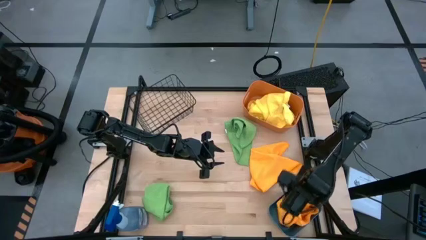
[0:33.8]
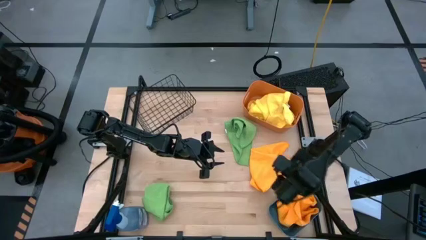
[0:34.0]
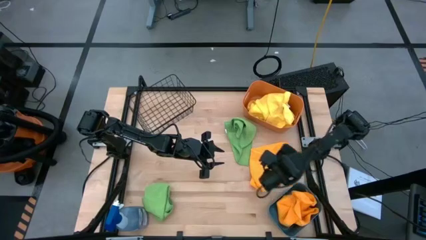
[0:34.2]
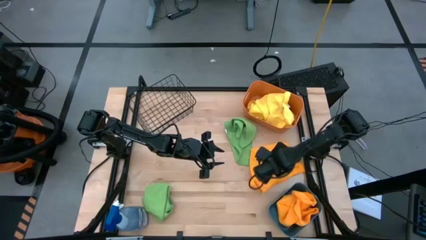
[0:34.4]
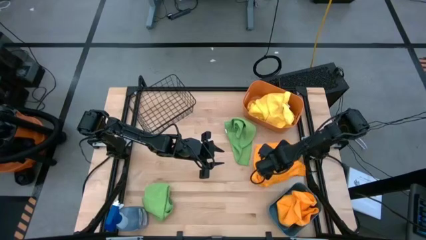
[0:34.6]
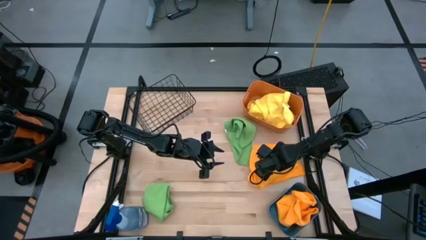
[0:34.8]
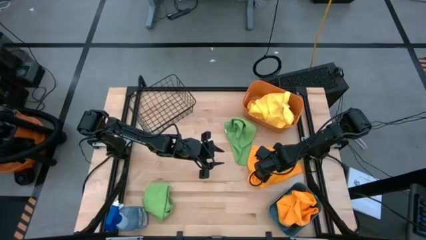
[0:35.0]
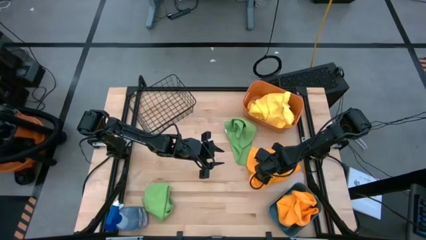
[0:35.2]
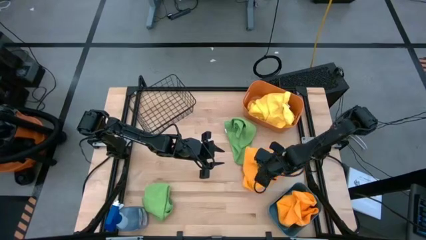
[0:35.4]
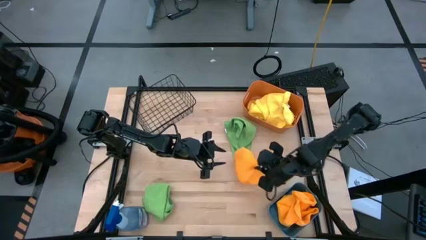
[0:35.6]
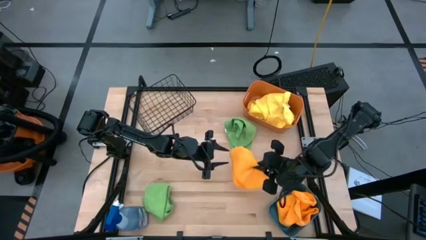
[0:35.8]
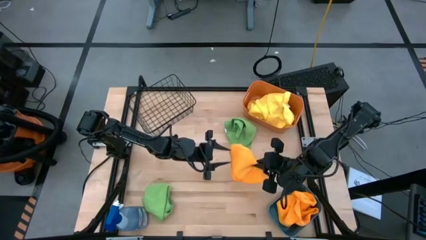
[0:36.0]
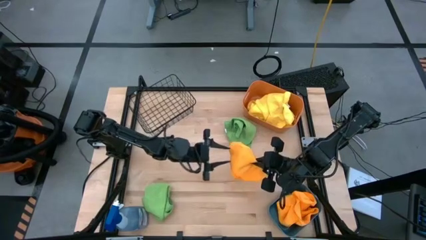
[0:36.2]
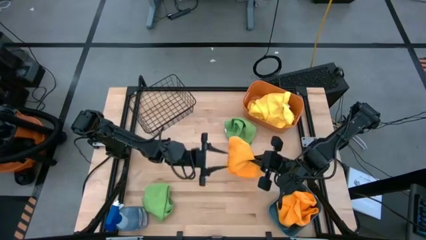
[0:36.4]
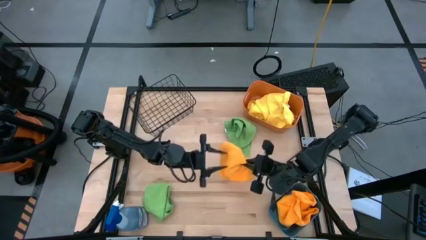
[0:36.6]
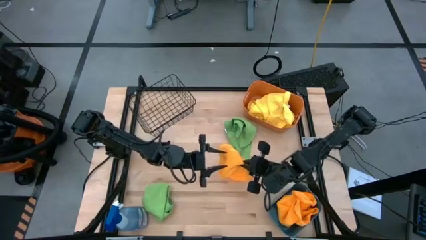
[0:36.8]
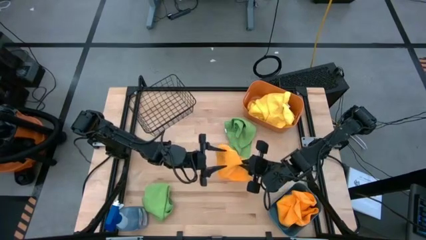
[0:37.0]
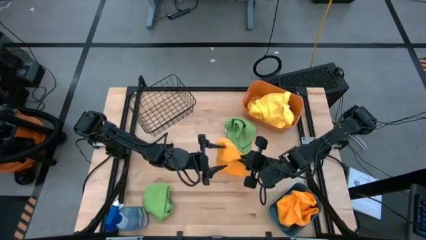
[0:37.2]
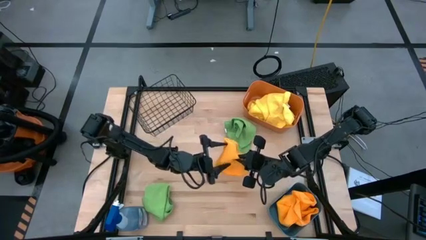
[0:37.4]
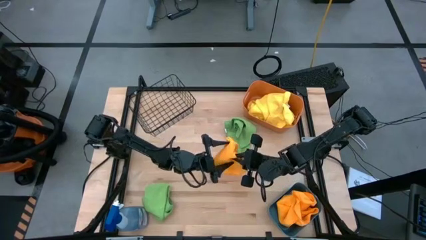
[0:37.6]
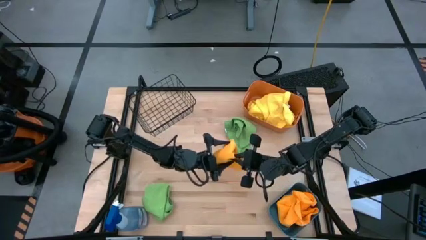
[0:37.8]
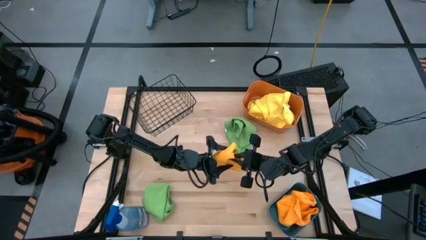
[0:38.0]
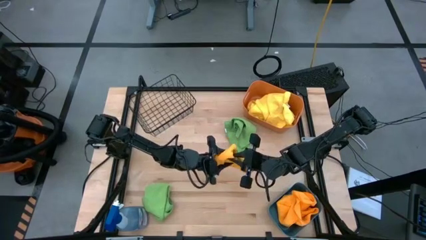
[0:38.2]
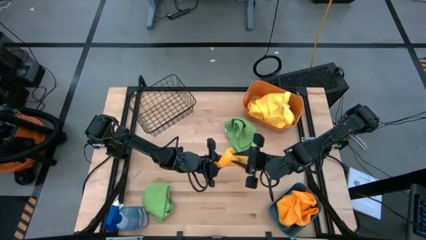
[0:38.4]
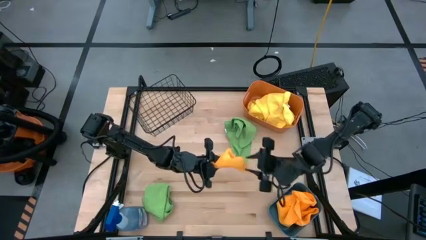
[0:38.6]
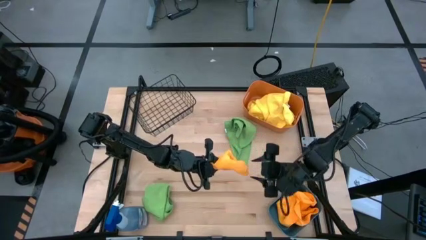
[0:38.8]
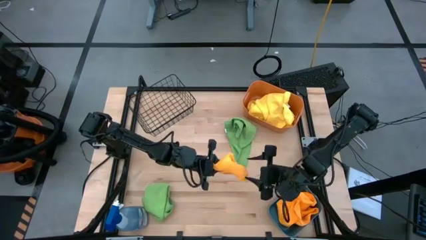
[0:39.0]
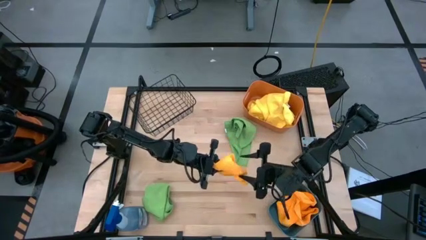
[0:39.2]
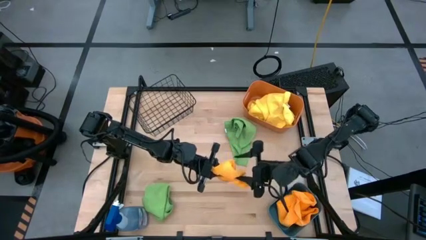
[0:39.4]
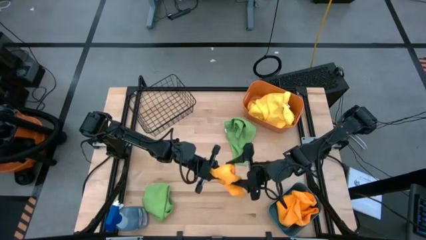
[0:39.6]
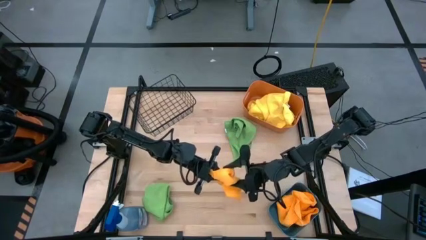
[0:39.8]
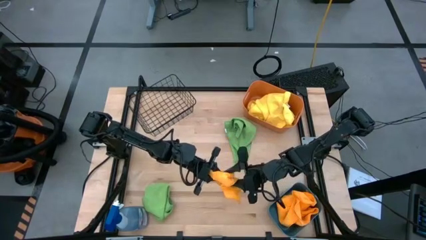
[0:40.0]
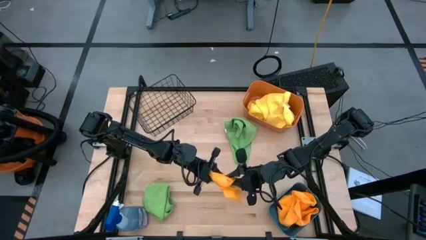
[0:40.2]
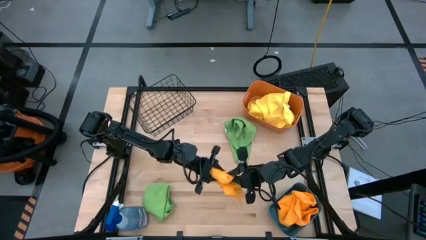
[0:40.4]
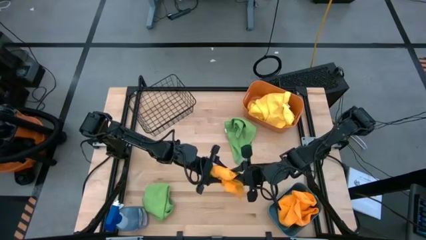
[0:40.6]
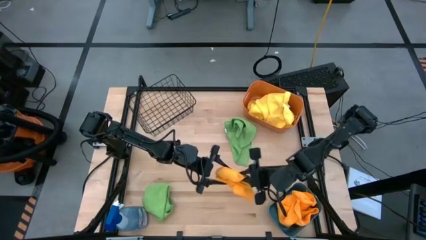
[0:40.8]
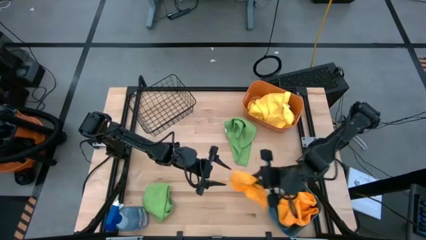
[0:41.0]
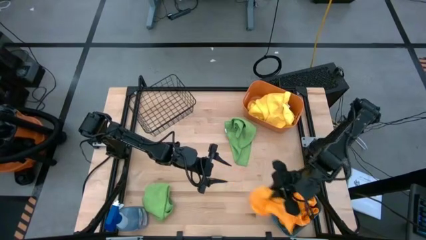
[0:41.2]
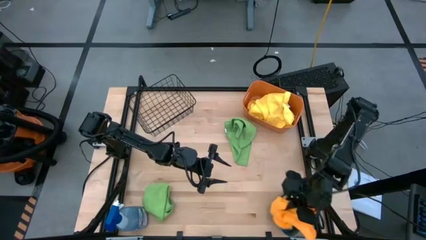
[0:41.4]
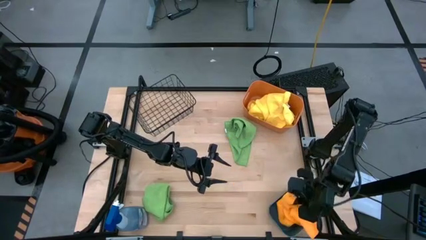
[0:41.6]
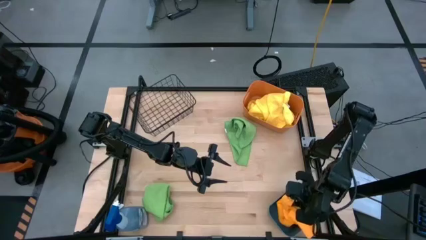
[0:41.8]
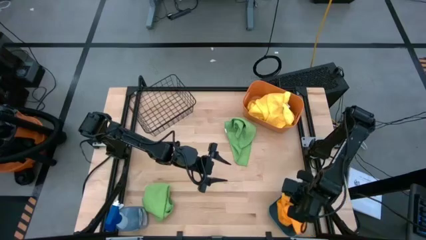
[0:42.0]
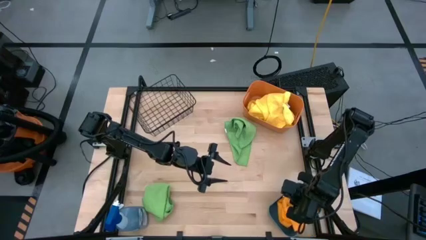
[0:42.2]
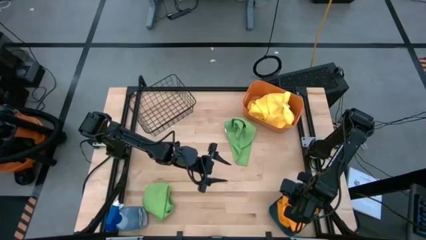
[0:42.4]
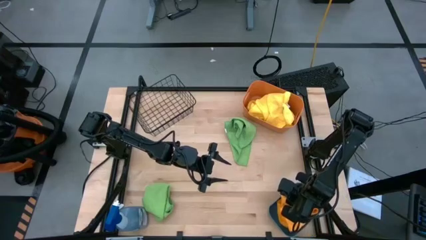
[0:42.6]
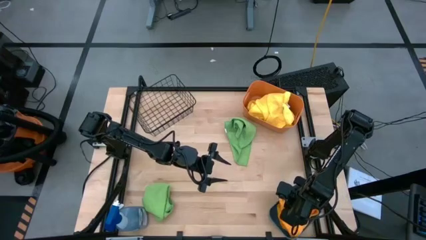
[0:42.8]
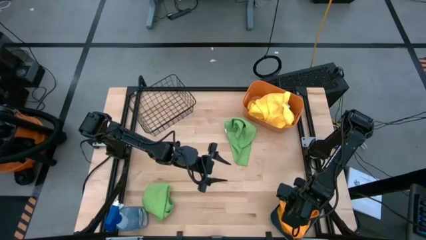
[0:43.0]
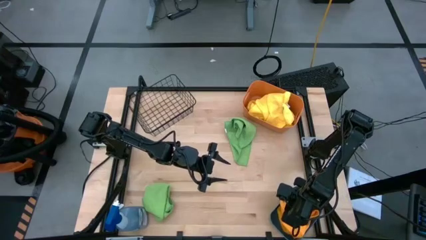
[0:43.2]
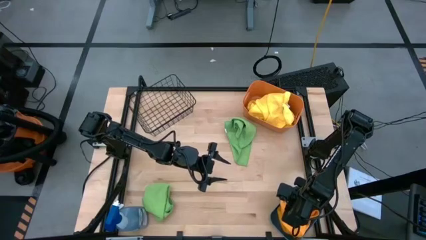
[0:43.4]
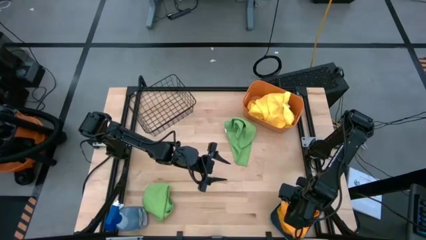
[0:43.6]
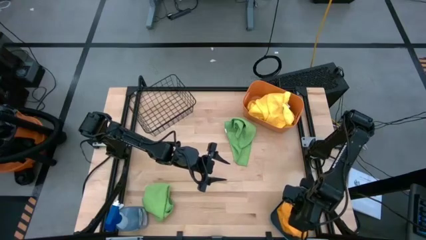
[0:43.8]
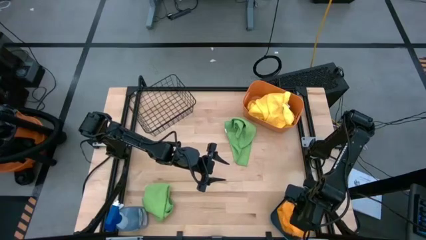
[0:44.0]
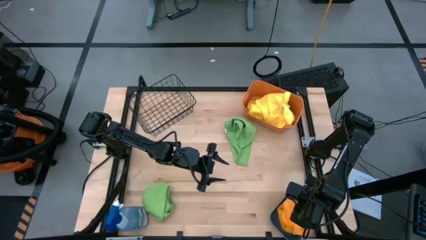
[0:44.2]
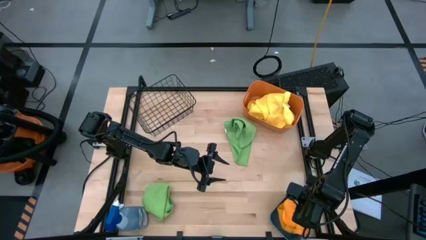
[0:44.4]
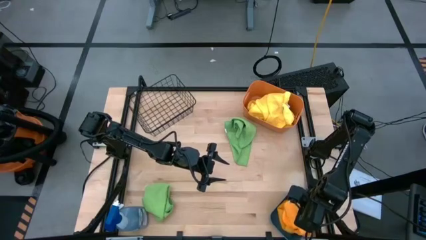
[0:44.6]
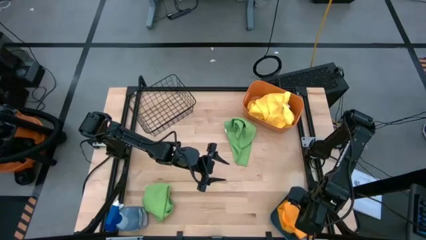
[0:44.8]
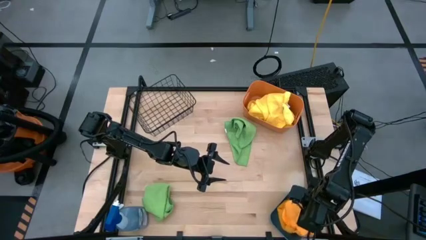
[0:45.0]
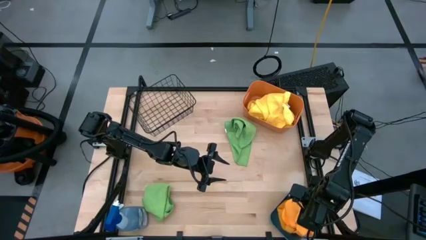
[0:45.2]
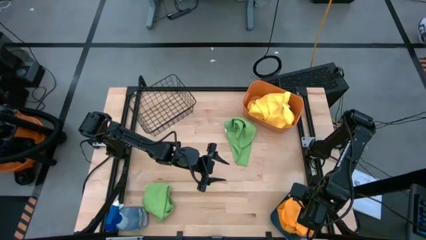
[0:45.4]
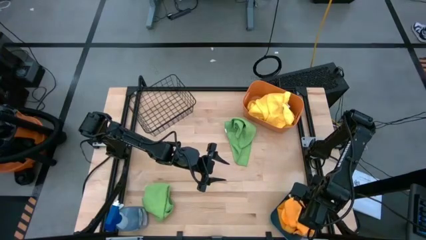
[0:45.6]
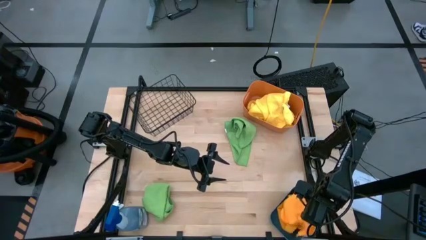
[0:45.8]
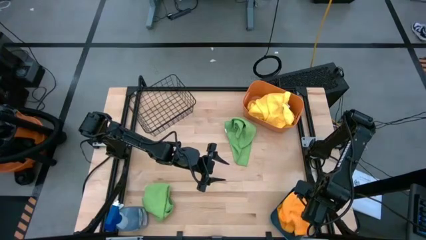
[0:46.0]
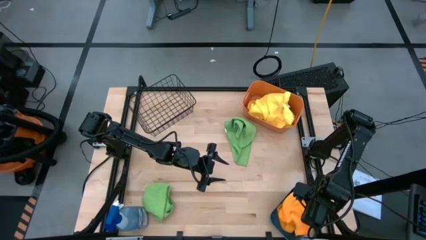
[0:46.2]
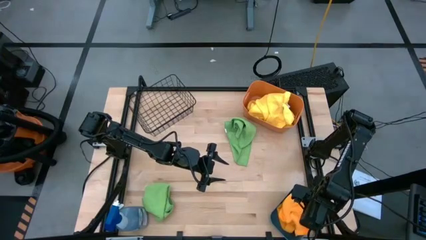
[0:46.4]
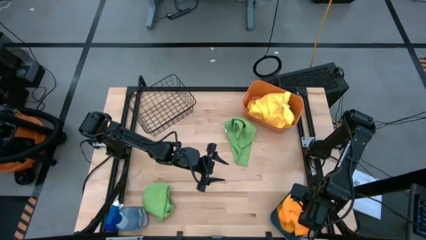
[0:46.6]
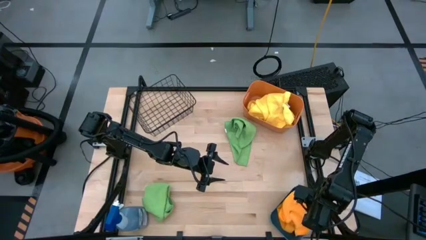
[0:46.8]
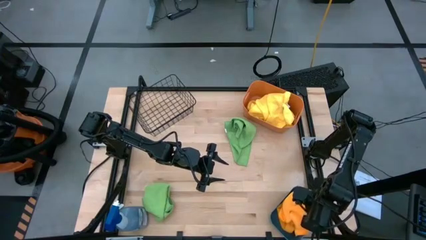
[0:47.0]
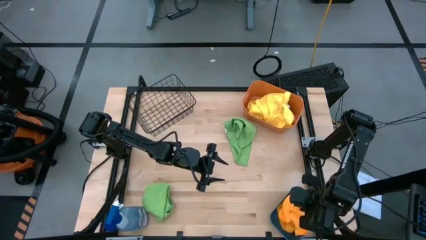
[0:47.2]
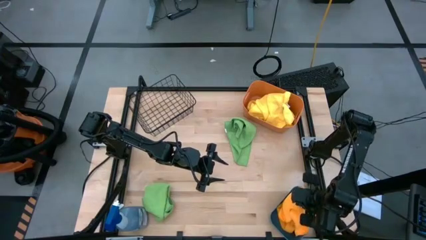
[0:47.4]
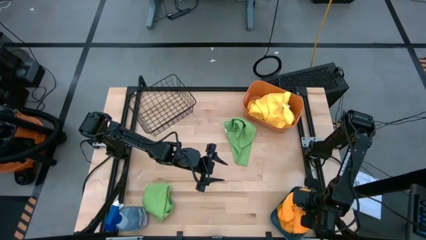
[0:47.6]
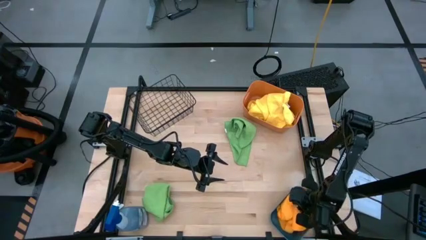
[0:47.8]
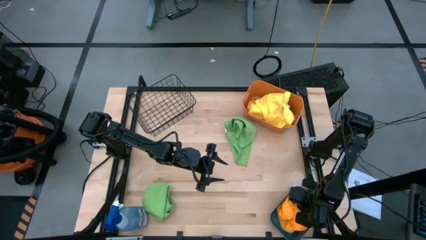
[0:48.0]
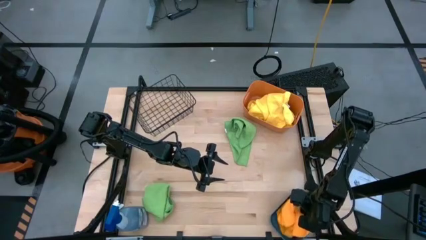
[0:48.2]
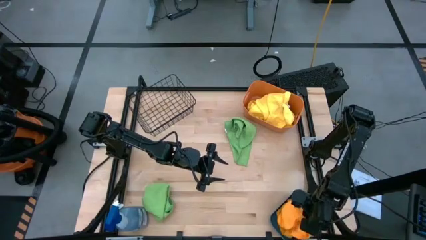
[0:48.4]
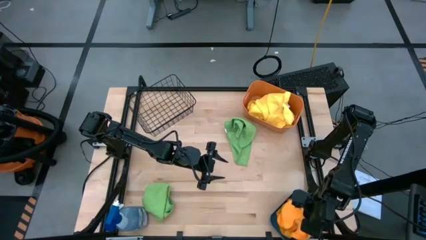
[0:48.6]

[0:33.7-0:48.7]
Task: Sort microfiber towel by color & place in baskets
Put the orange microfiber cloth into the blue bin
